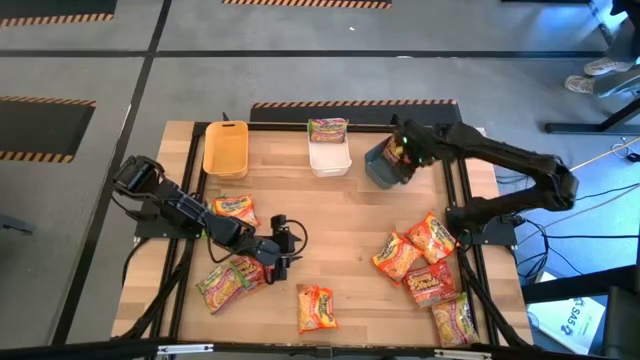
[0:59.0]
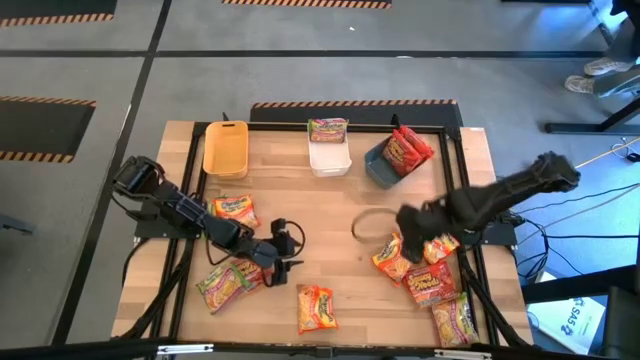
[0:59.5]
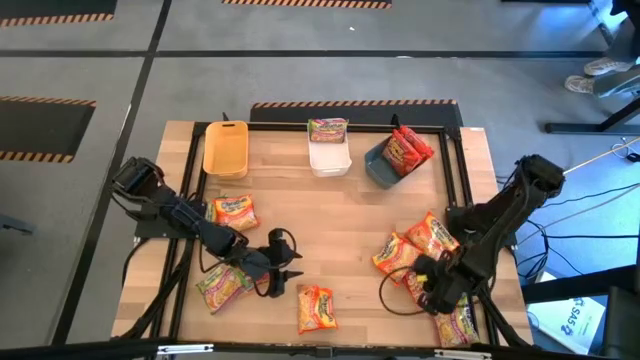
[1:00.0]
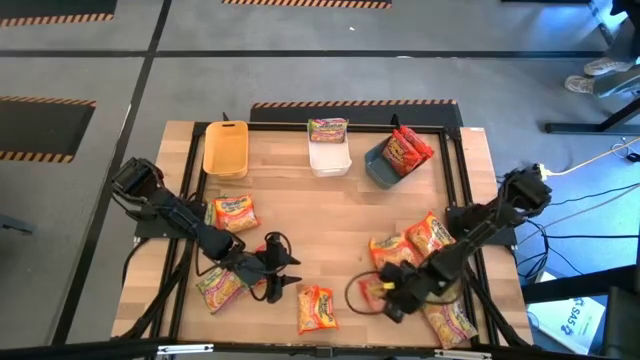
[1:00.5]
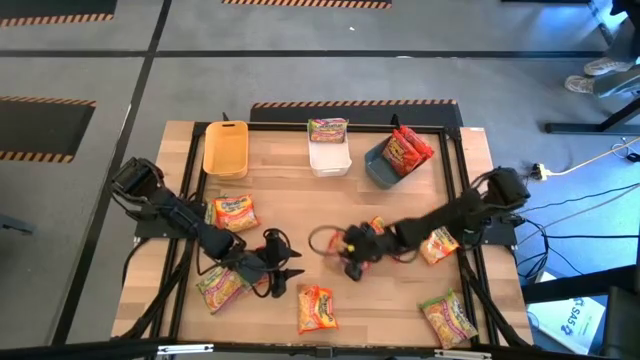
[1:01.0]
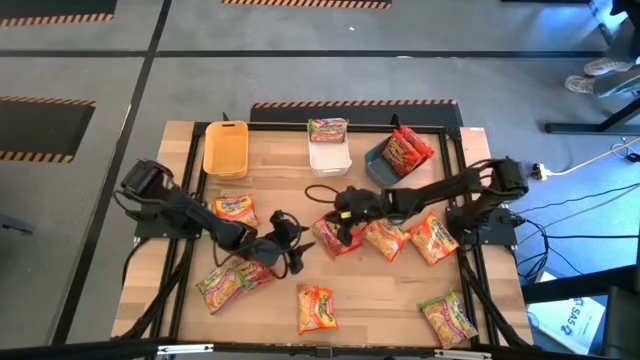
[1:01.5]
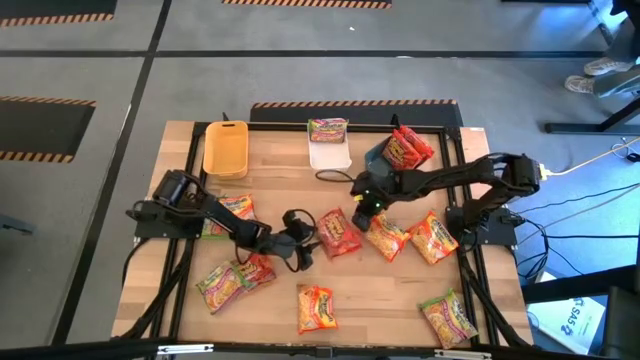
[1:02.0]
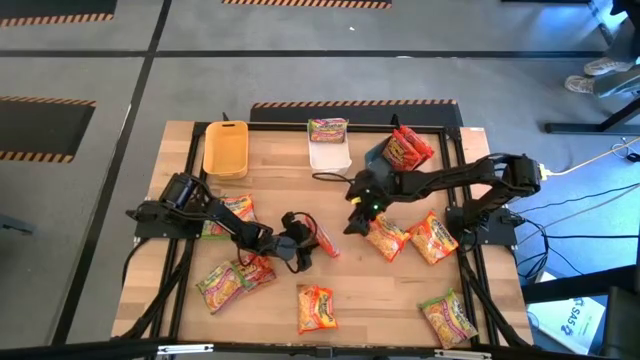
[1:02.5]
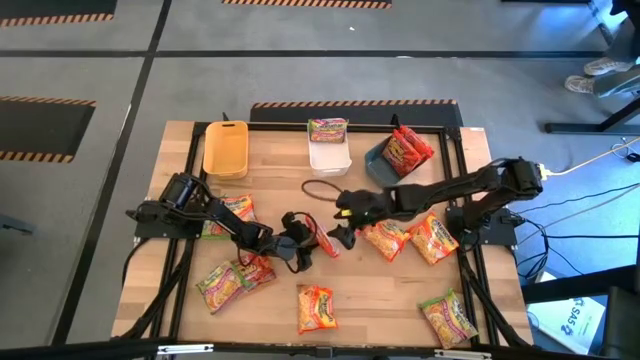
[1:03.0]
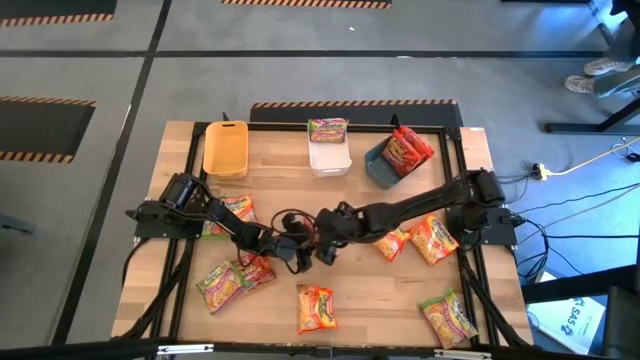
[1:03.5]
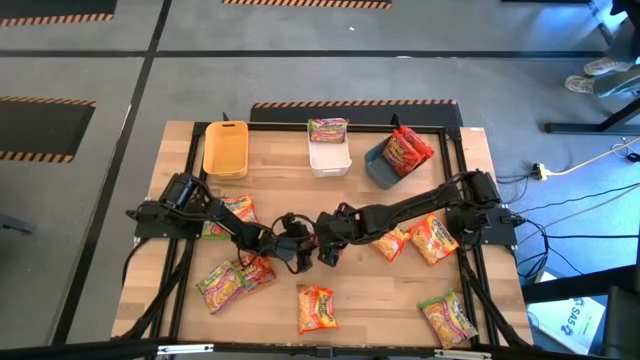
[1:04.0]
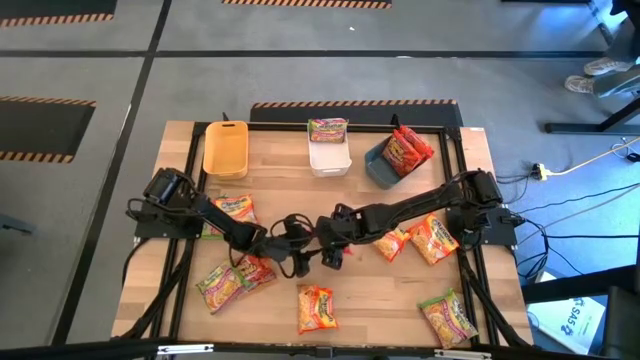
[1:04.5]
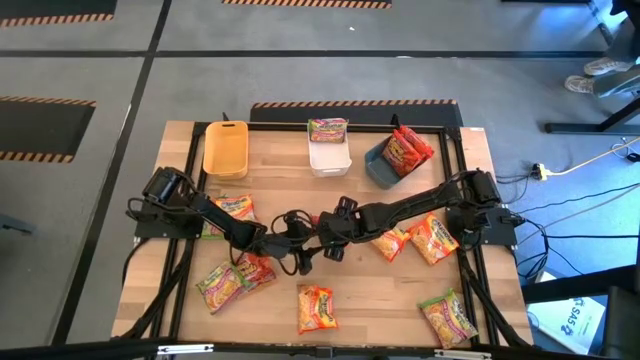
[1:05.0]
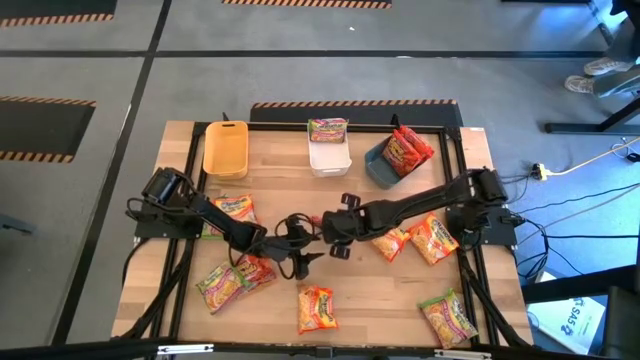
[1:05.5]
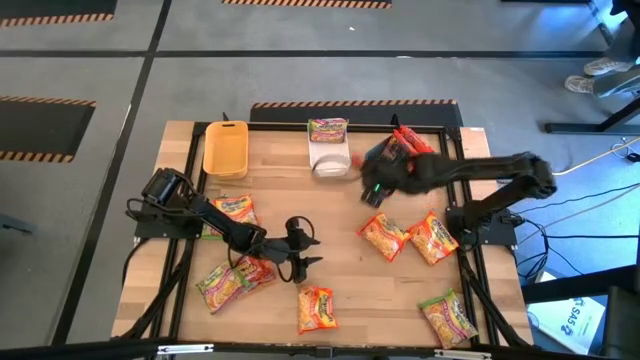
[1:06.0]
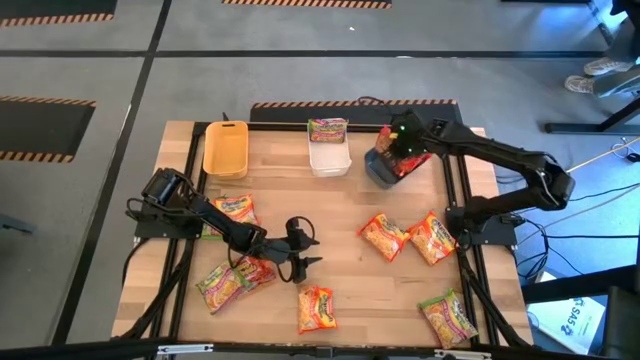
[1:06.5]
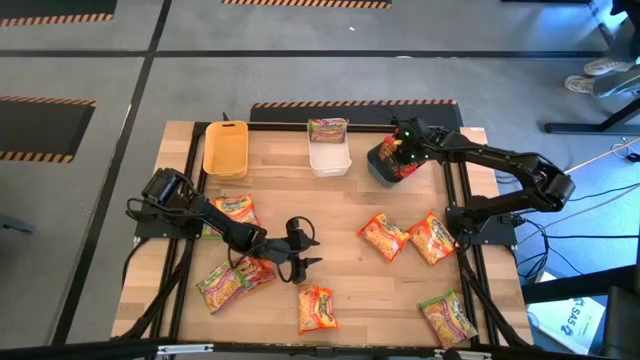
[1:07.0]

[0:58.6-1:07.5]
Task: Sort Maruchan noodles
Put the red noodle pack into the blue bin

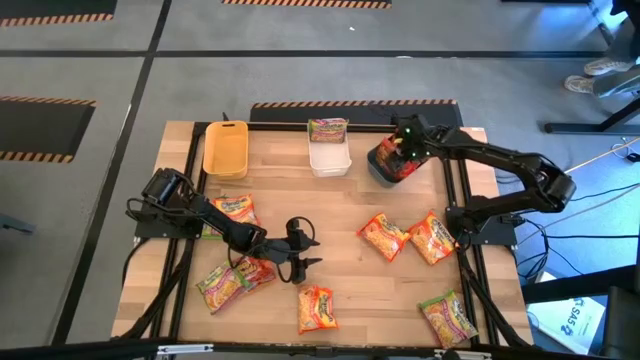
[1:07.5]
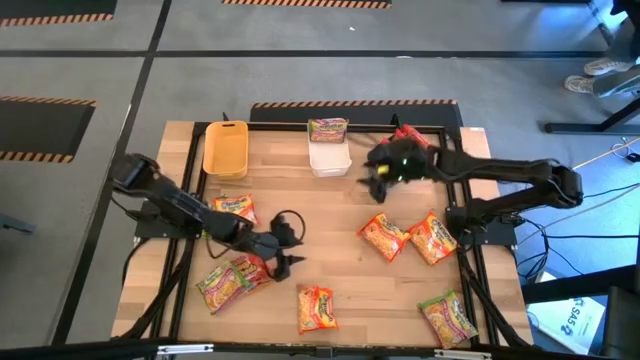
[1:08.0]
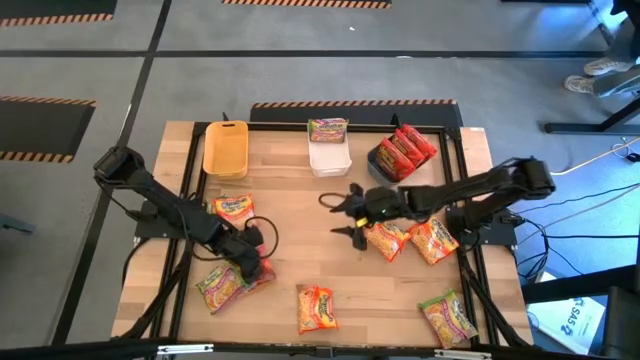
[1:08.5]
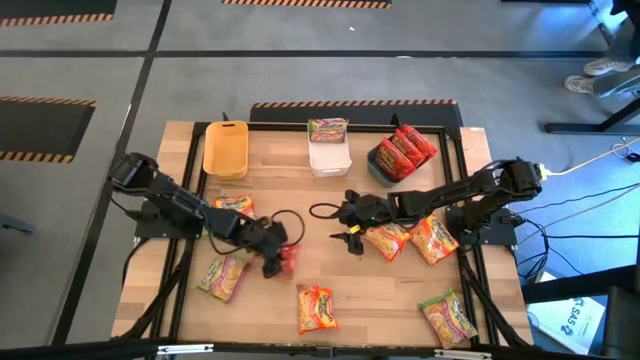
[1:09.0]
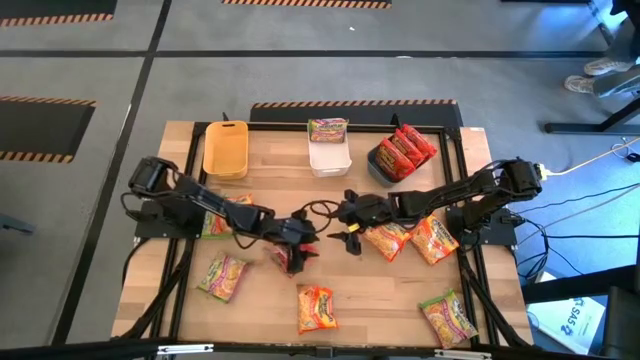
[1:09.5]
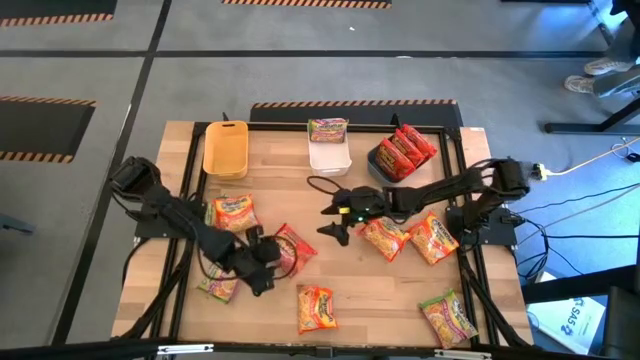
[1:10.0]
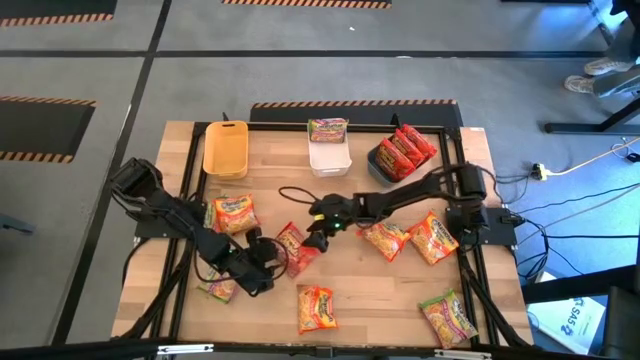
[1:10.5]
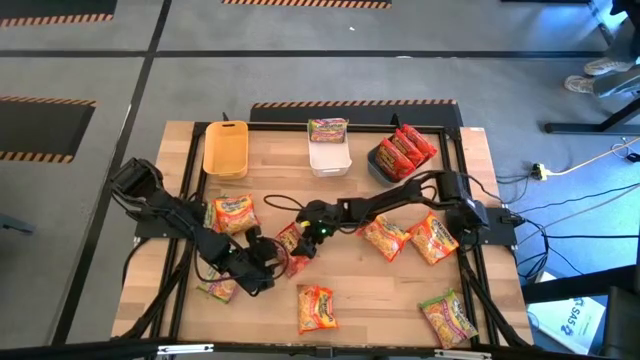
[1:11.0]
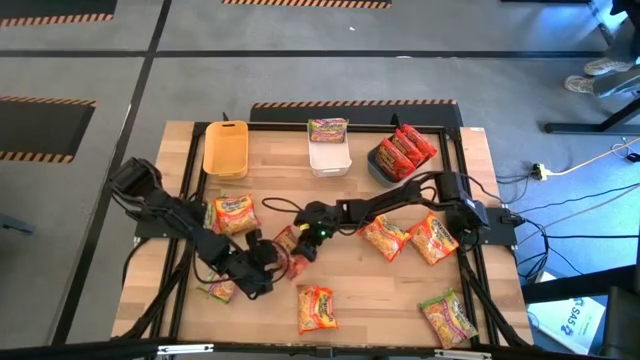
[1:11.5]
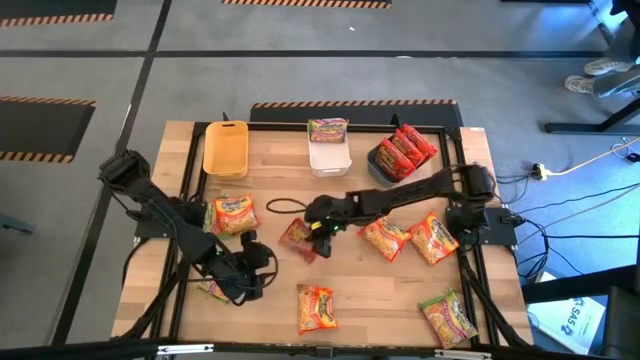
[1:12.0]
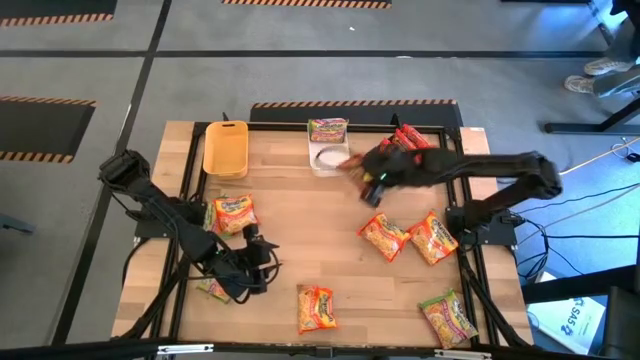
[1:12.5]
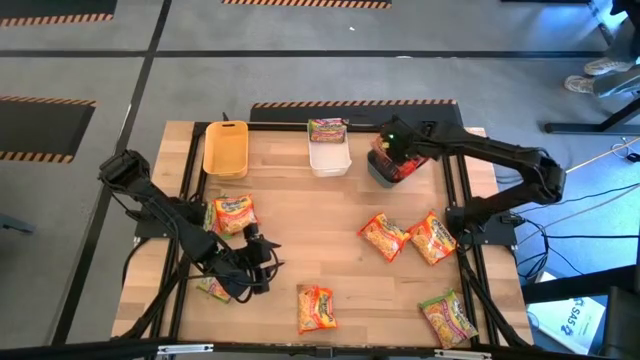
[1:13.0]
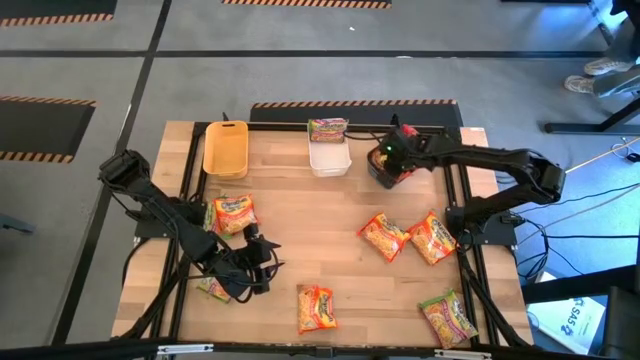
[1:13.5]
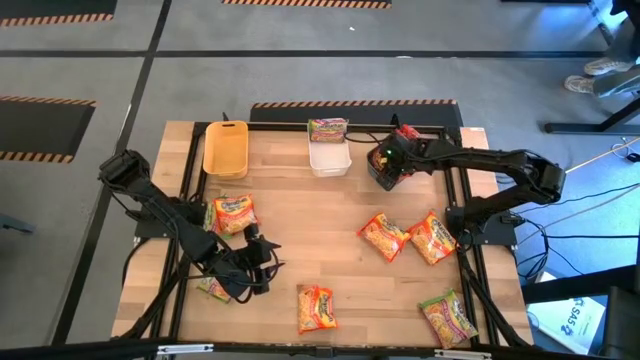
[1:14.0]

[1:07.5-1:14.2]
Put the red noodle pack into the blue bin

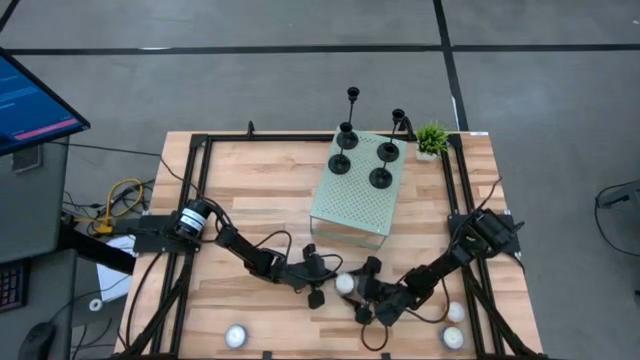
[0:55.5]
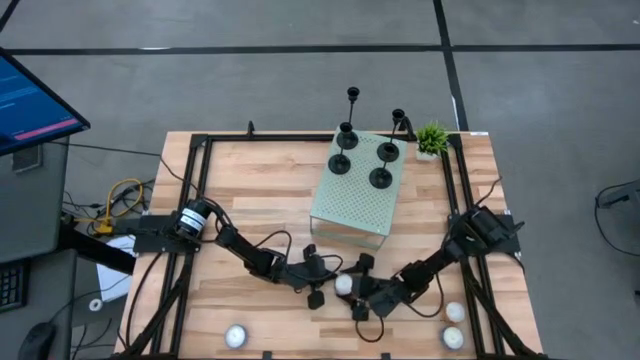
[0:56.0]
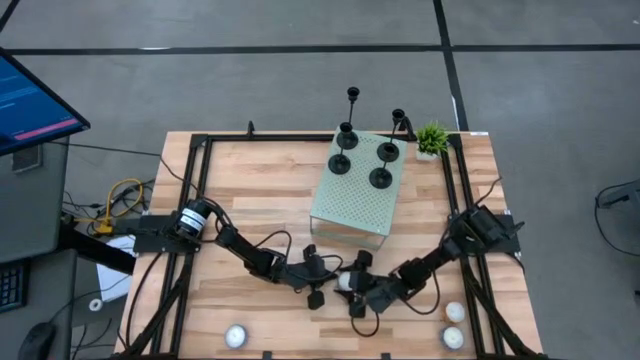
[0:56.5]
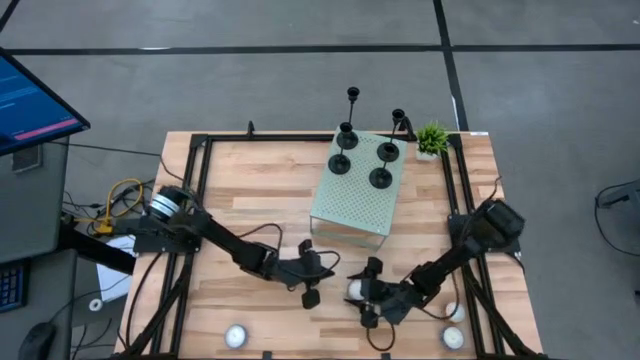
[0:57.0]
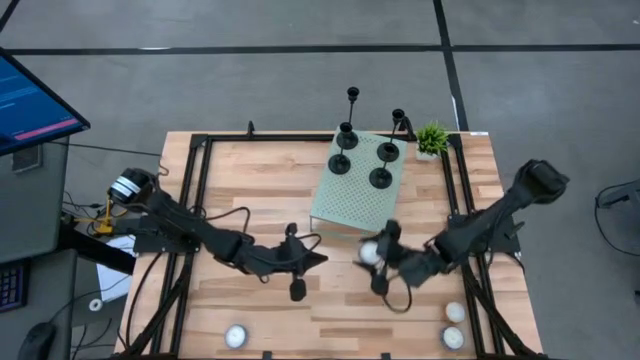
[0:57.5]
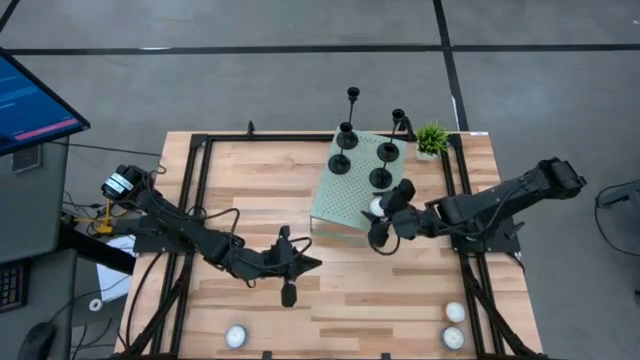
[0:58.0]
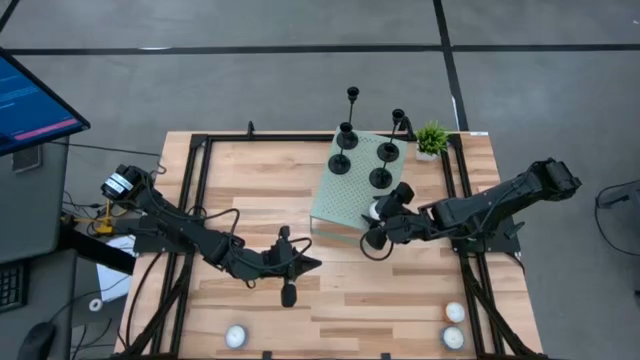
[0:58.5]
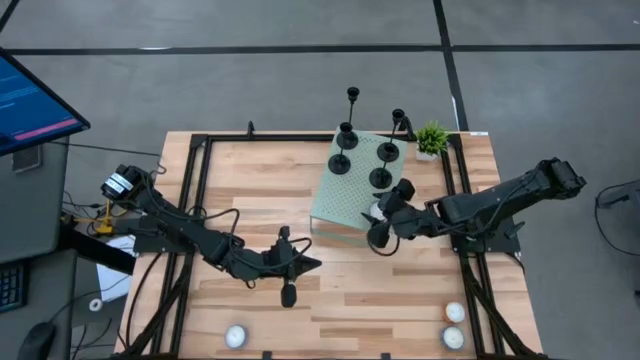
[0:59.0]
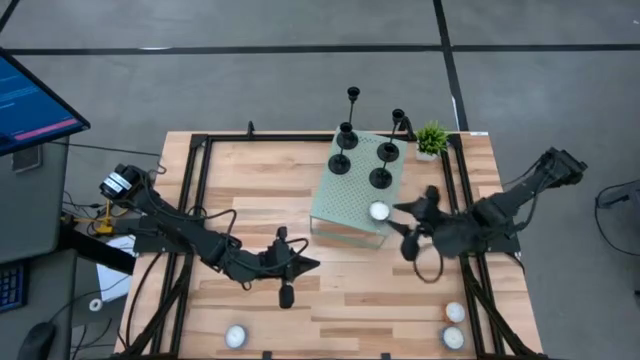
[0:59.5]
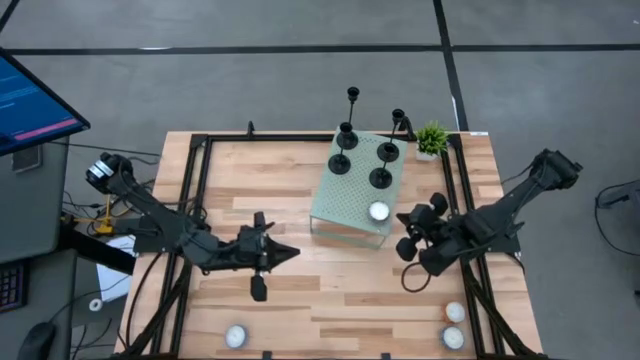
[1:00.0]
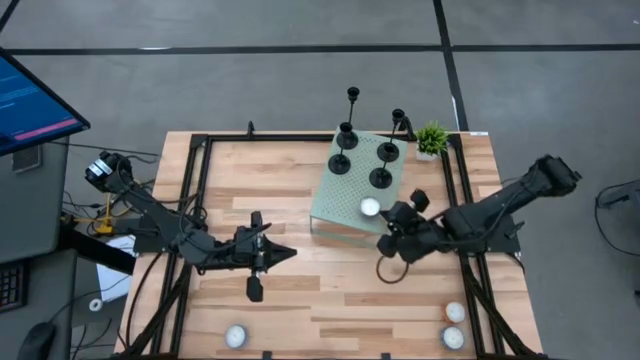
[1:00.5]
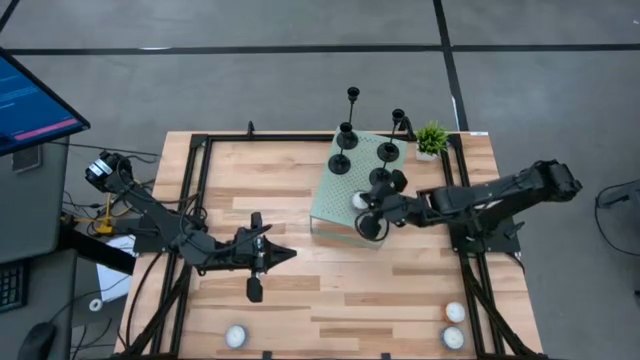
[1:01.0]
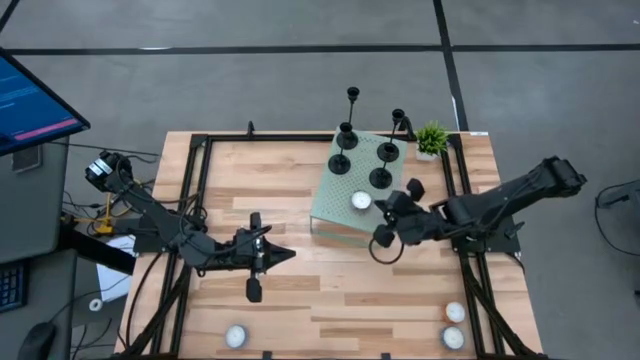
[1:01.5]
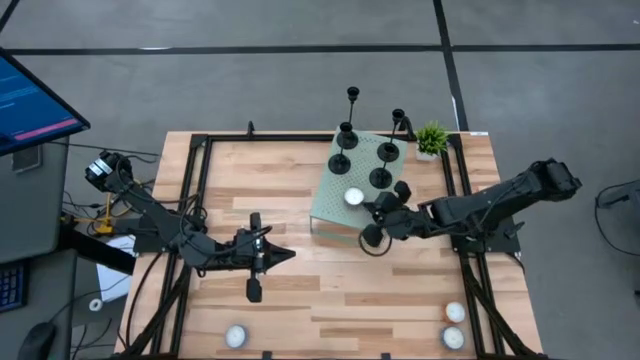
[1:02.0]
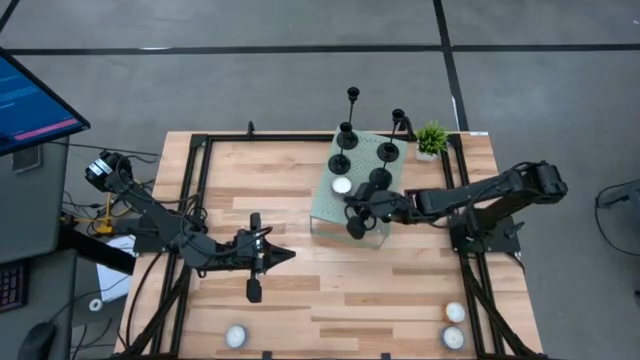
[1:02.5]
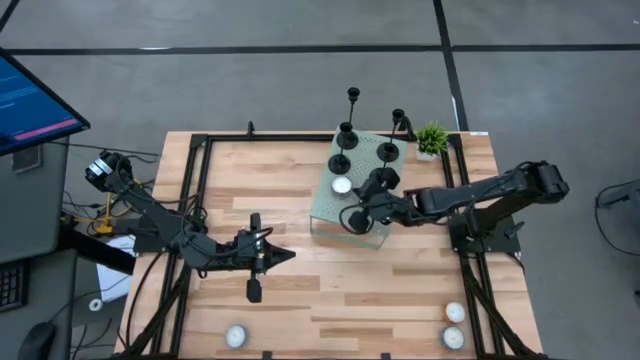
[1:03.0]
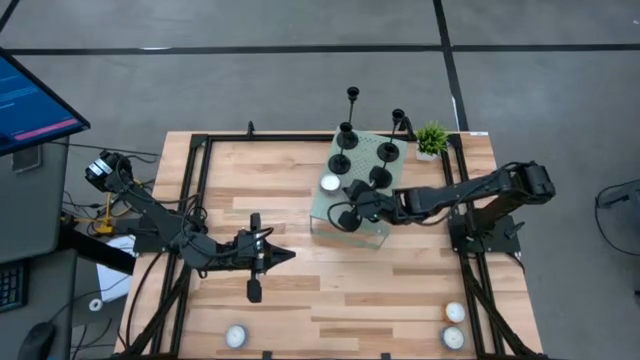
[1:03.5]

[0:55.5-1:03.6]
Task: Pick & Place candle stick holders
Put the red patterned scented candle on the shelf
